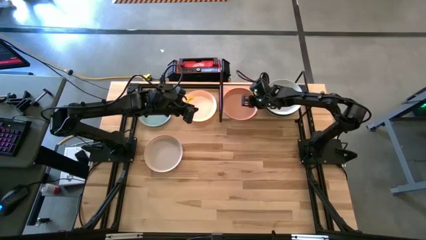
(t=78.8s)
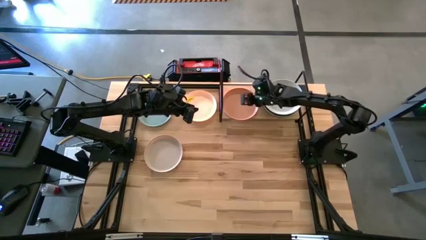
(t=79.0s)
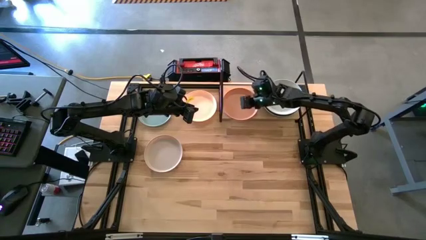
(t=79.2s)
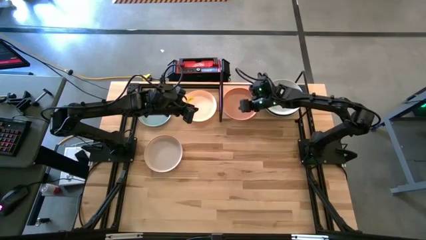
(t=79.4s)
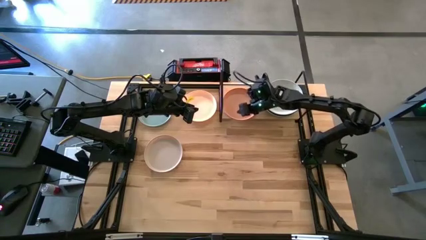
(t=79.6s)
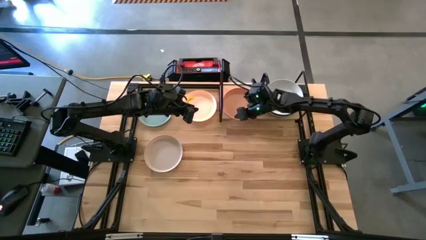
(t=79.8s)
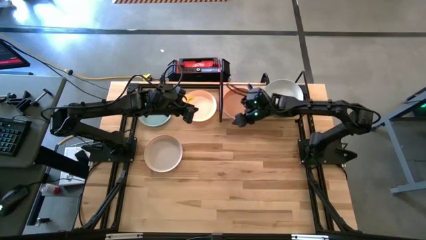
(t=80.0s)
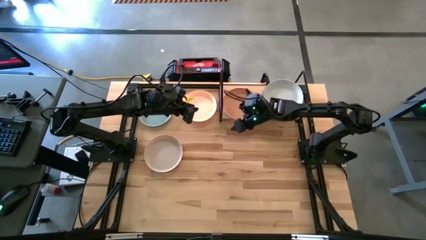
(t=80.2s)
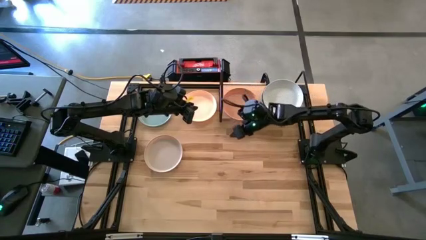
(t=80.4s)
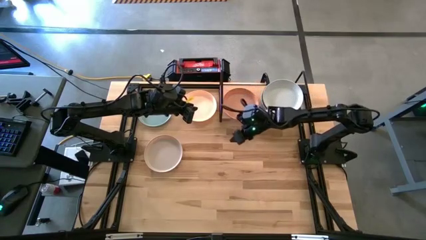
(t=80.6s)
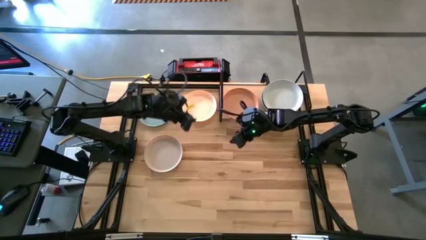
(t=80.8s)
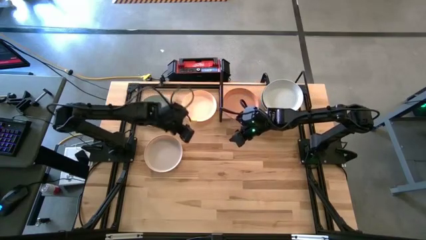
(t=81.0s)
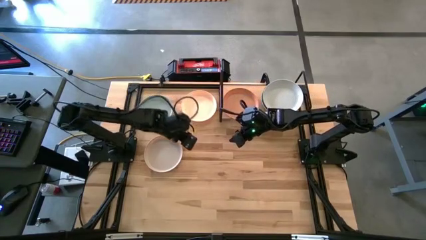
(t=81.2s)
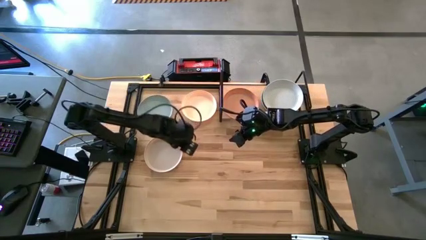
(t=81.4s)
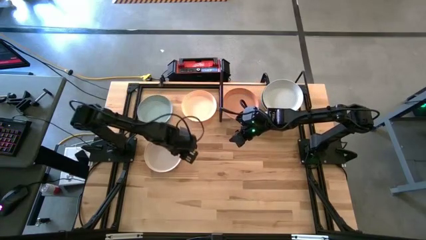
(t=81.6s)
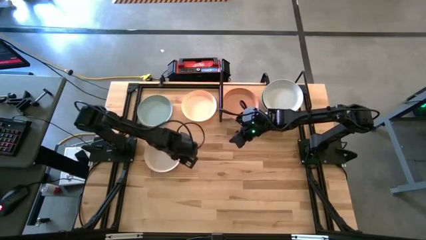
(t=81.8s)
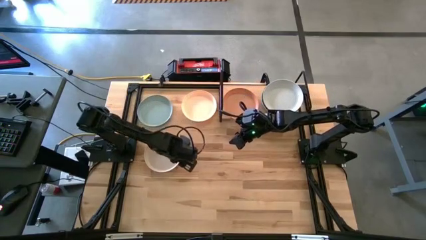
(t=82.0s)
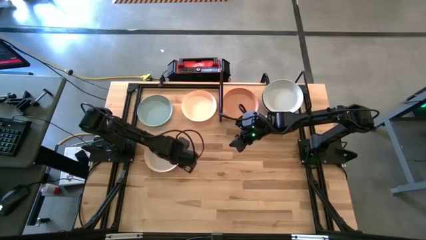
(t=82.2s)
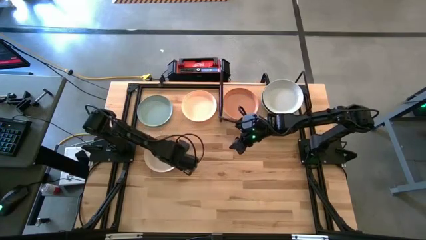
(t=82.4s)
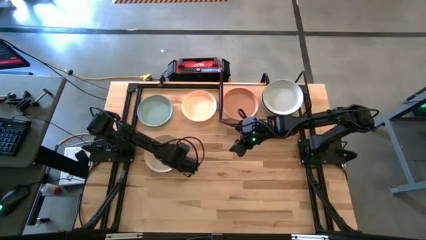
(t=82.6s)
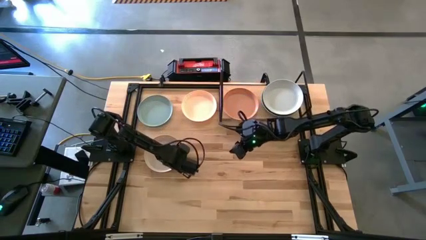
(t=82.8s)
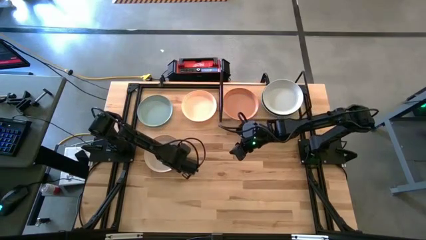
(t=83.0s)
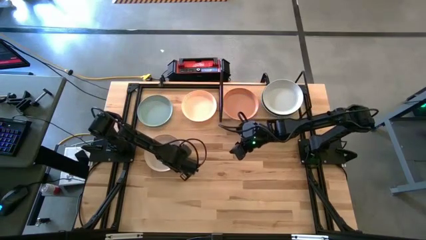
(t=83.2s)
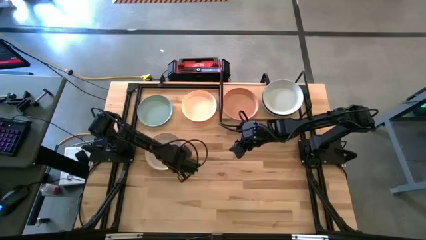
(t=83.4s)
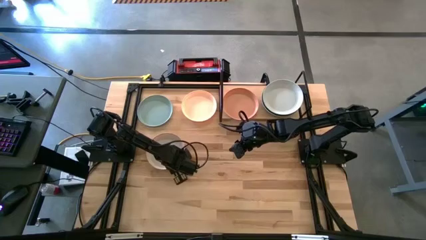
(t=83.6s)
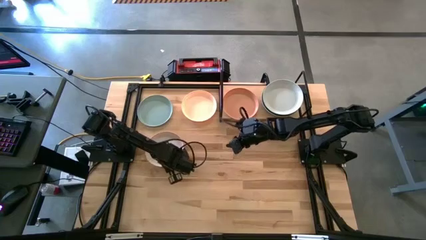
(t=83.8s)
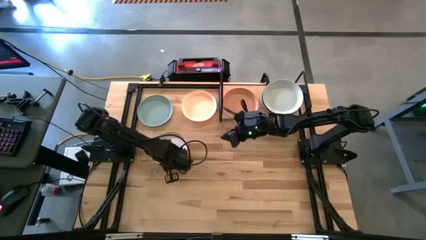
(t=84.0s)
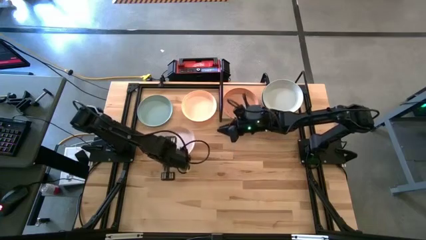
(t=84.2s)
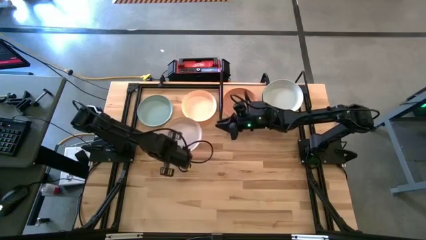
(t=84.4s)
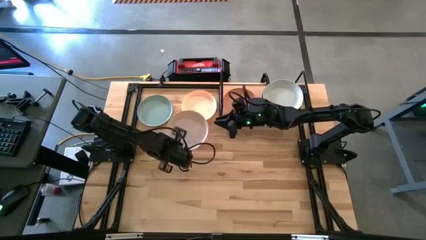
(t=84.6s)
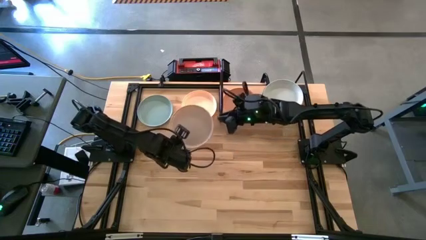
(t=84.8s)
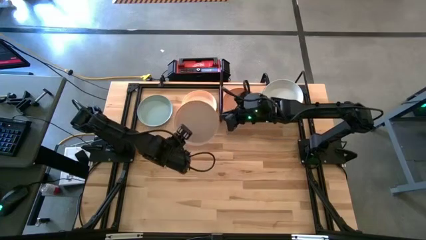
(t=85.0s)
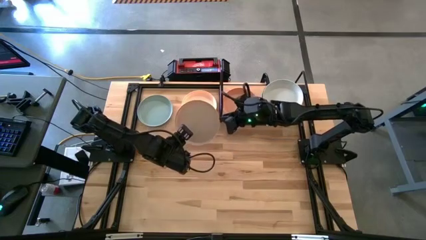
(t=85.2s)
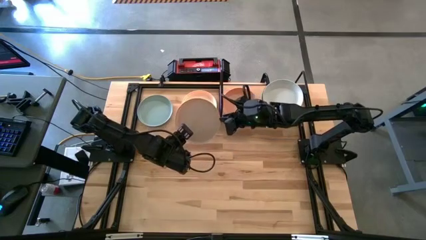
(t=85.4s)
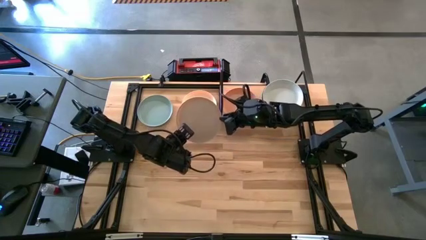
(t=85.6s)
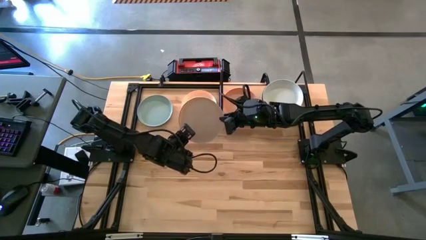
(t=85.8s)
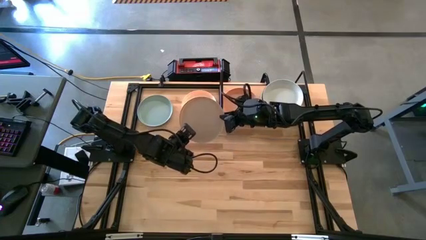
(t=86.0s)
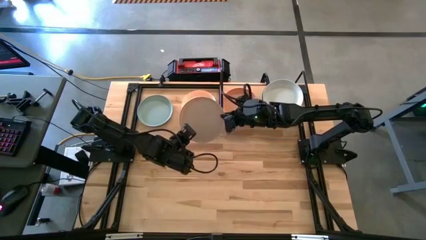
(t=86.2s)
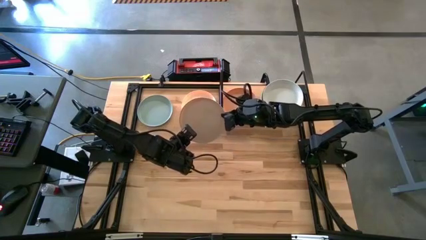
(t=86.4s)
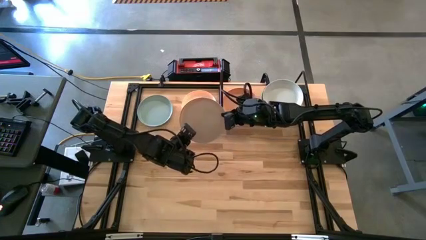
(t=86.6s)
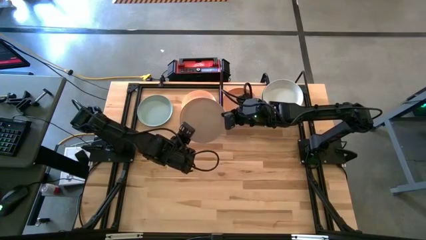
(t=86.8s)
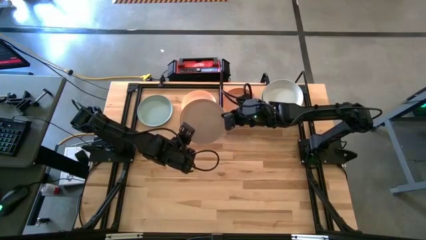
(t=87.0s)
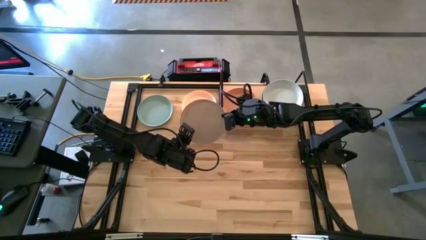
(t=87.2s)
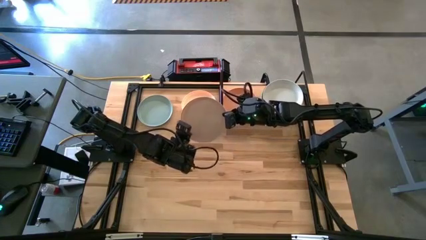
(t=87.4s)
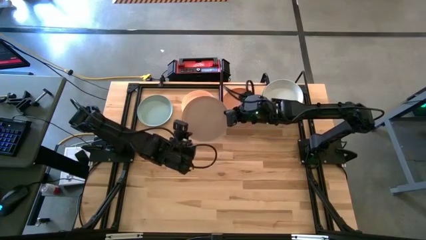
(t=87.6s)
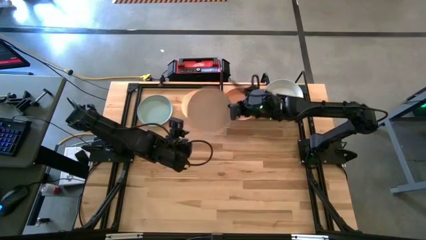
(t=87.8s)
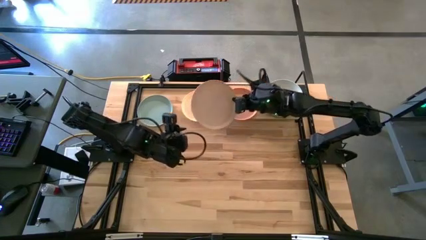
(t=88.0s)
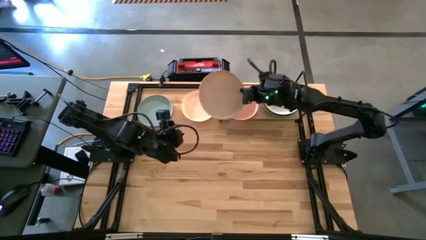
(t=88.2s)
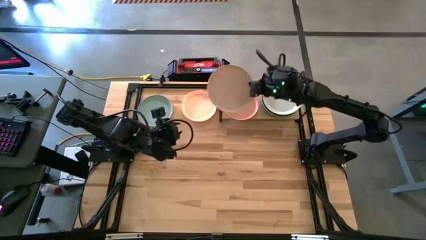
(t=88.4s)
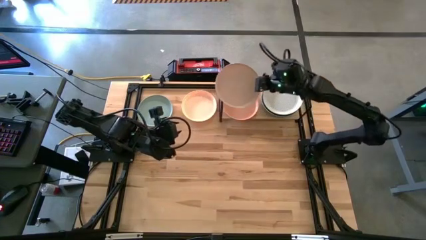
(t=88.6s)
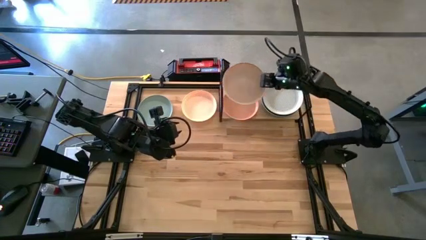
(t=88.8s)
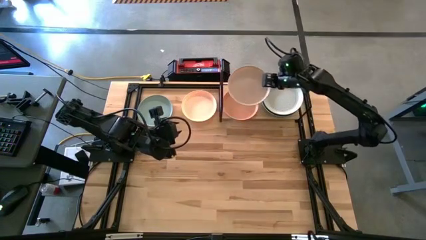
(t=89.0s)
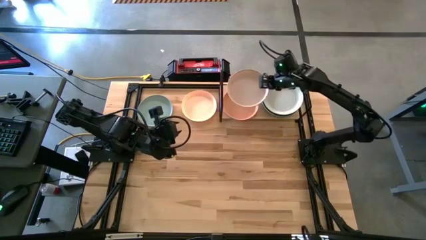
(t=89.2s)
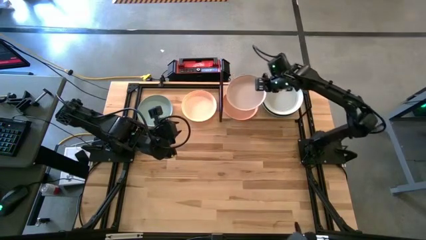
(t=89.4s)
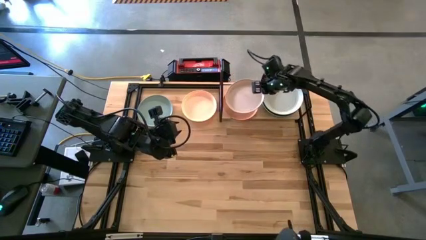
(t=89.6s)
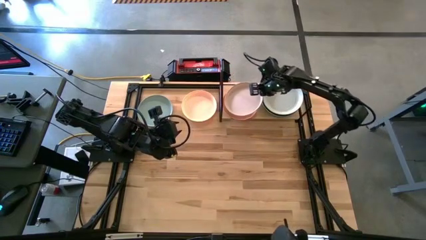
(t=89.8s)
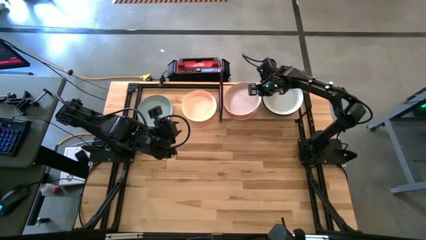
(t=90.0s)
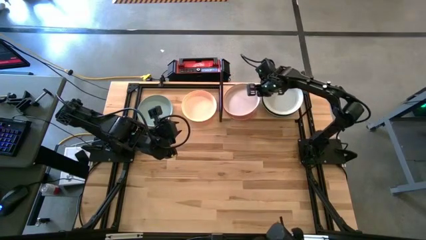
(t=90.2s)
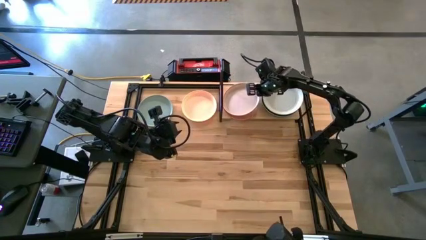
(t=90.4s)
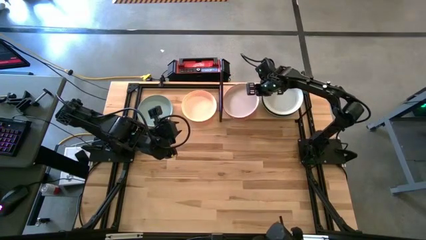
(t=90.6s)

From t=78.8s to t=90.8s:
Task: Place and stack plates onto a shelf
Stack the light brown plate on top of the orange plate

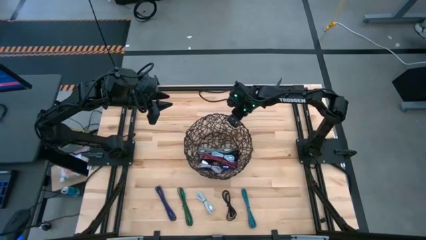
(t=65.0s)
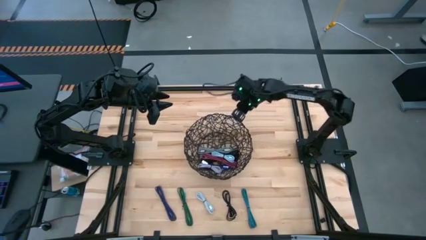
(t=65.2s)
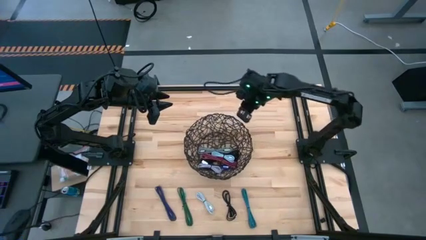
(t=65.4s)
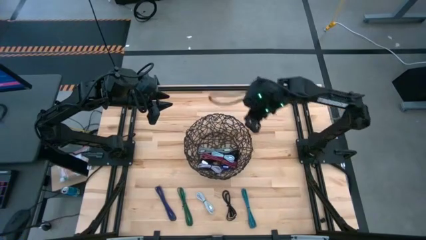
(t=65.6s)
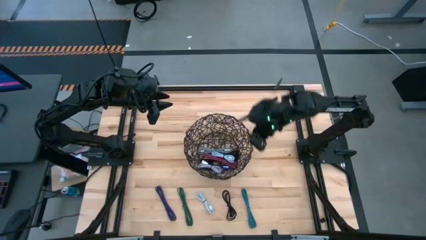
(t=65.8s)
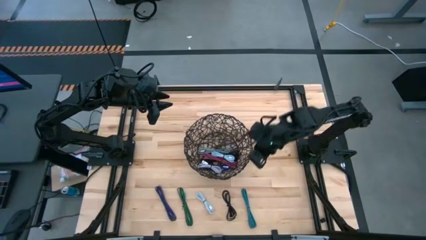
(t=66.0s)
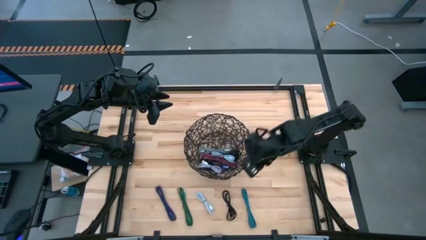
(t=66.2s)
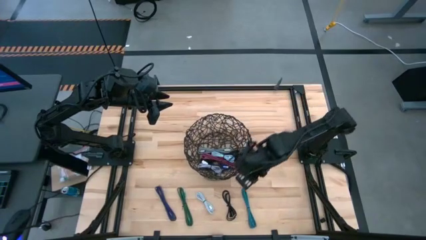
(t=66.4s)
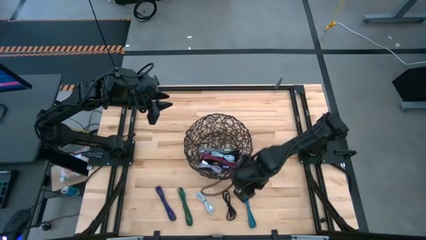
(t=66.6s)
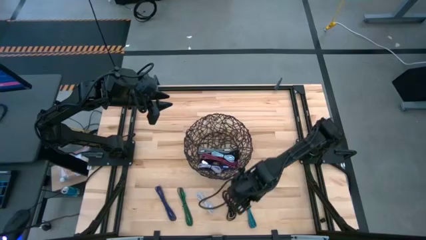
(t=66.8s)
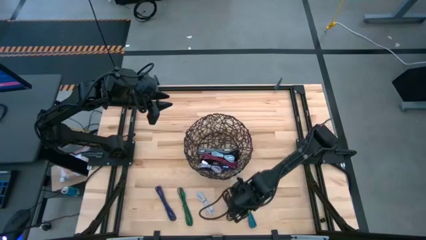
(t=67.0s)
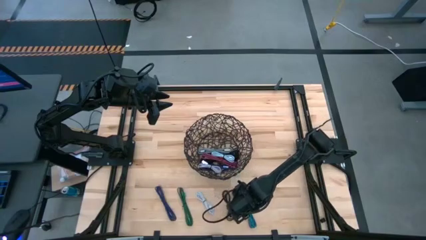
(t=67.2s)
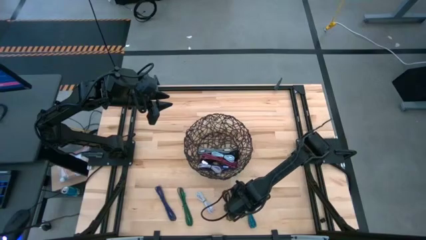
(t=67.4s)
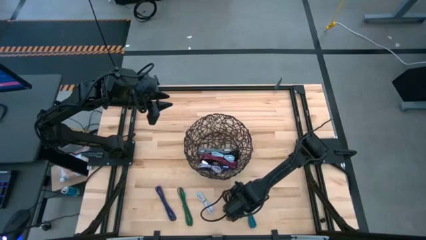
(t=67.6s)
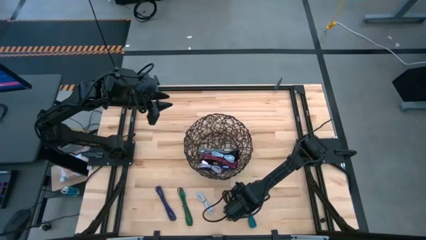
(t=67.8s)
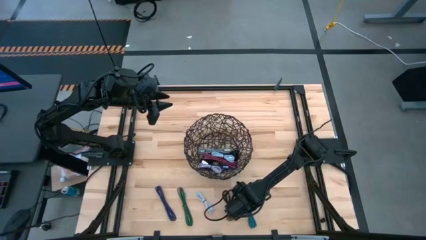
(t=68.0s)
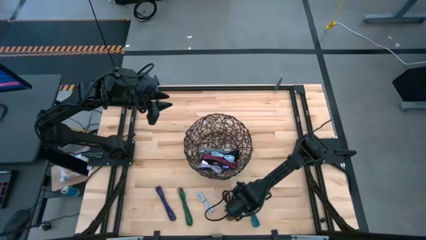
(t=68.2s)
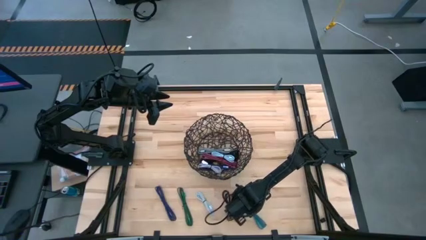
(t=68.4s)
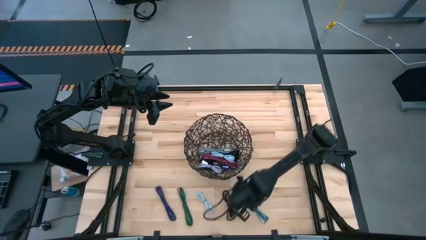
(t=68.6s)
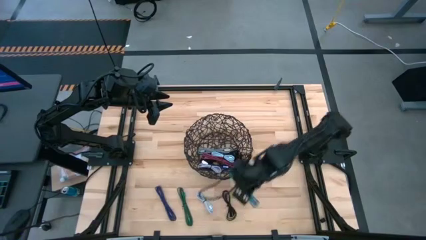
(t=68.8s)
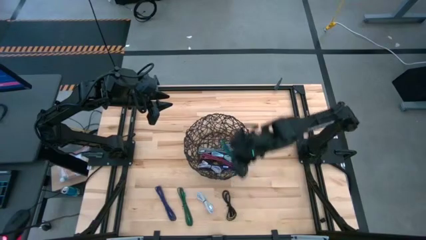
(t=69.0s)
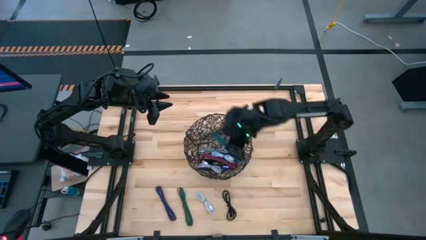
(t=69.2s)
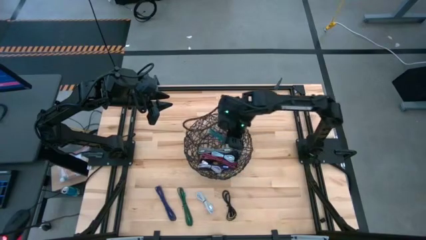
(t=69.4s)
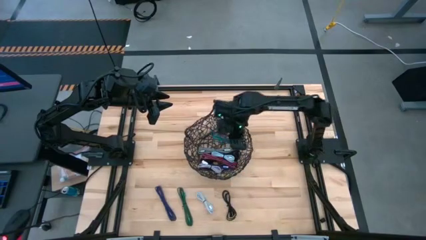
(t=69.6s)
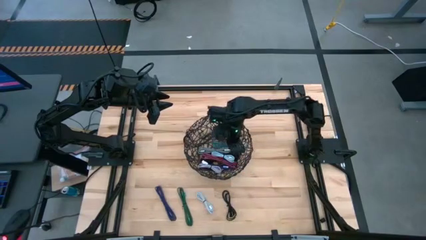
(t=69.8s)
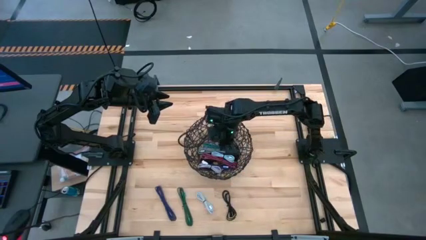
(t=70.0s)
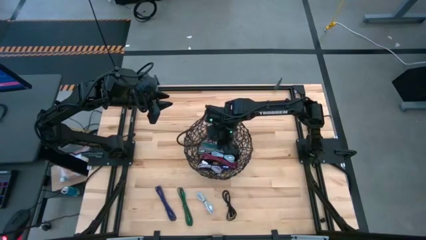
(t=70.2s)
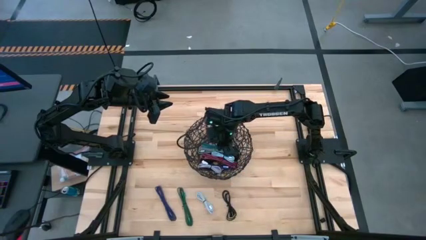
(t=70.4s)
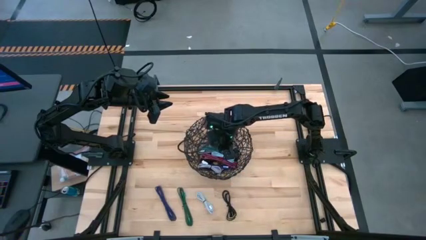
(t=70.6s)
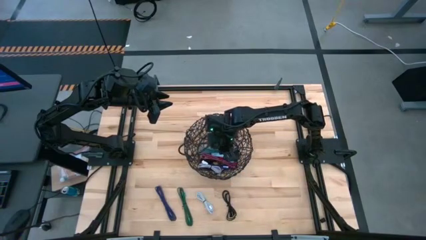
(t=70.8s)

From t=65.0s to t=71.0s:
Task: Pick and place USB-C Cables
Put the blue charger cable into the black mesh basket
